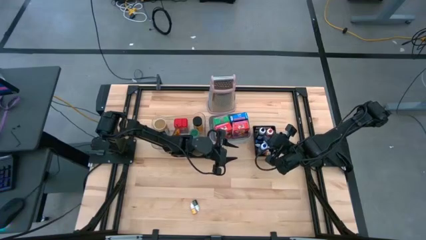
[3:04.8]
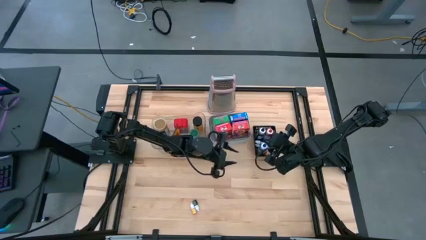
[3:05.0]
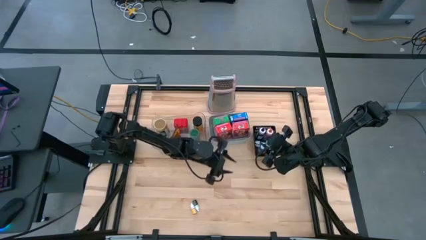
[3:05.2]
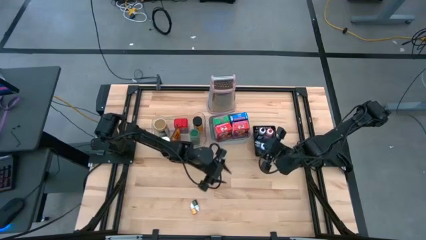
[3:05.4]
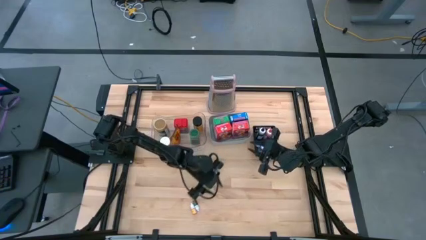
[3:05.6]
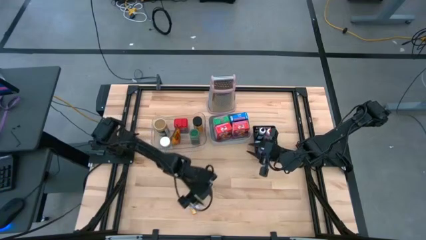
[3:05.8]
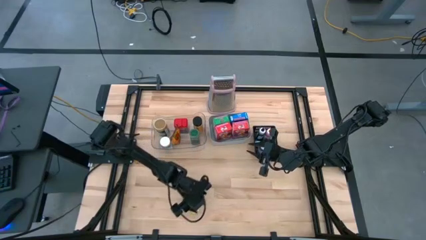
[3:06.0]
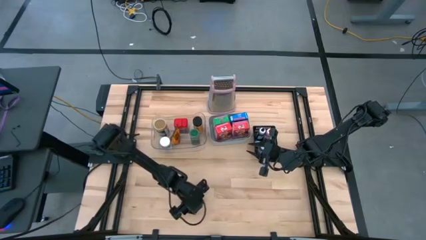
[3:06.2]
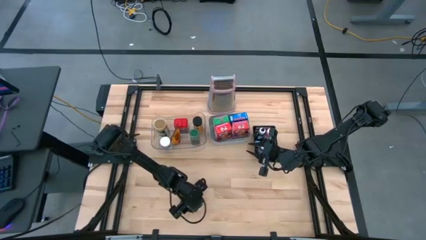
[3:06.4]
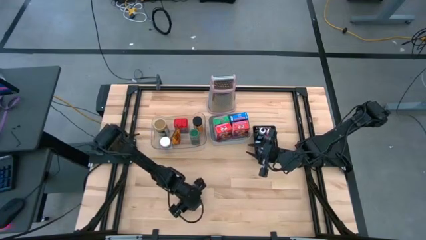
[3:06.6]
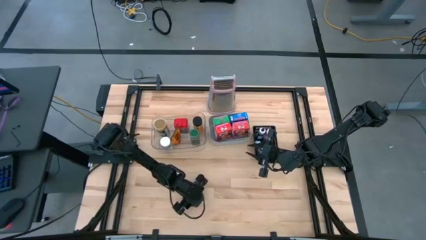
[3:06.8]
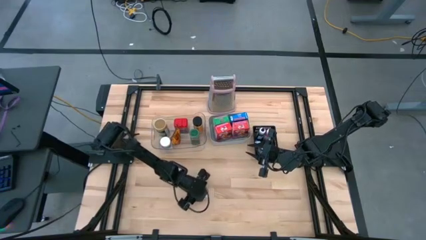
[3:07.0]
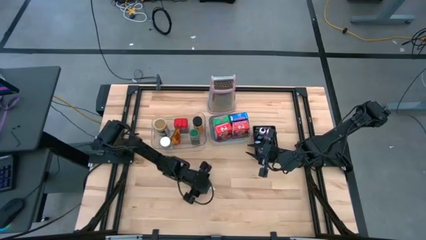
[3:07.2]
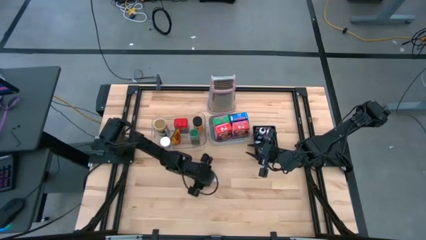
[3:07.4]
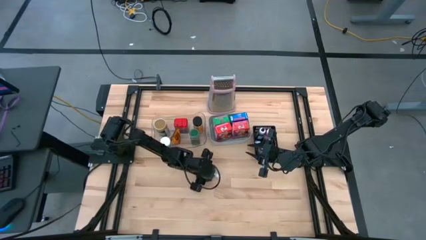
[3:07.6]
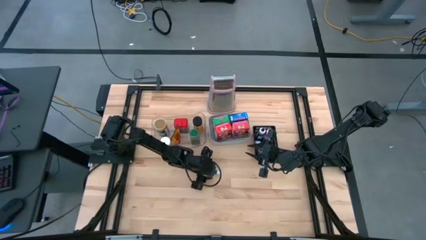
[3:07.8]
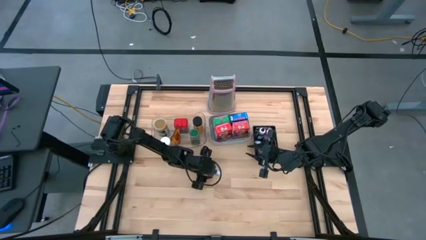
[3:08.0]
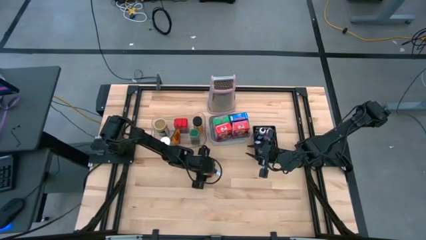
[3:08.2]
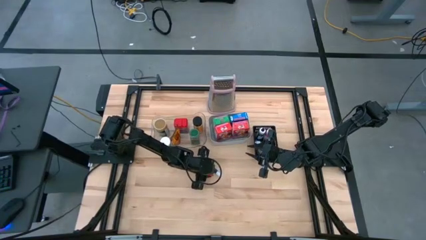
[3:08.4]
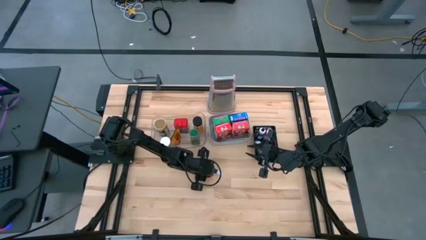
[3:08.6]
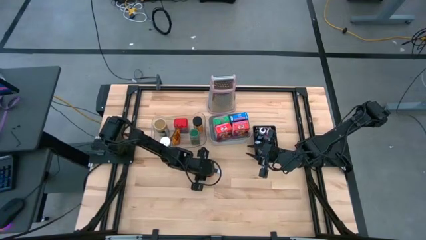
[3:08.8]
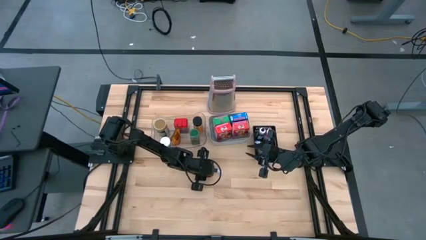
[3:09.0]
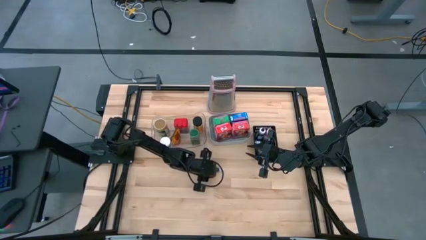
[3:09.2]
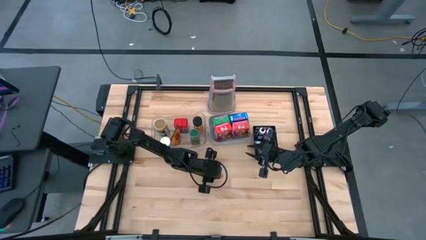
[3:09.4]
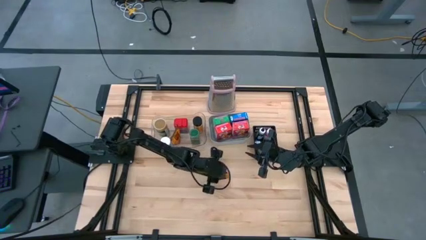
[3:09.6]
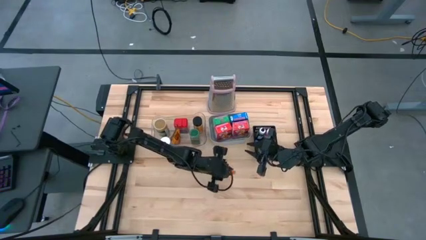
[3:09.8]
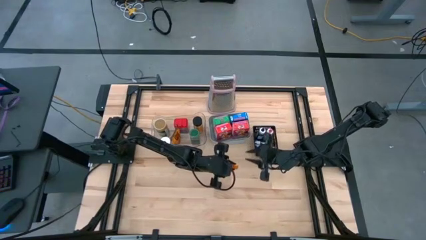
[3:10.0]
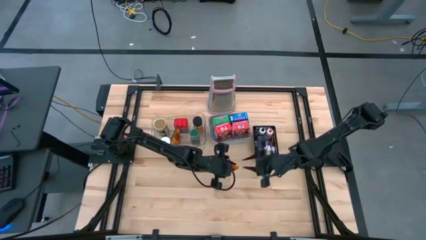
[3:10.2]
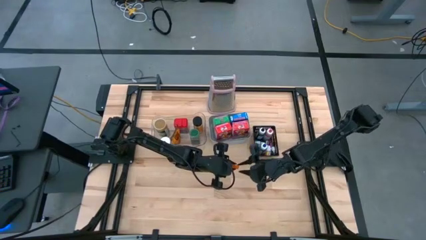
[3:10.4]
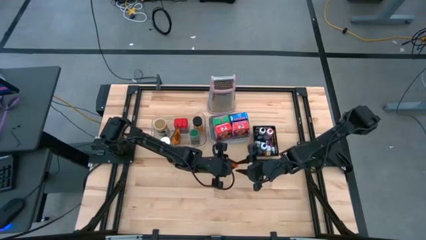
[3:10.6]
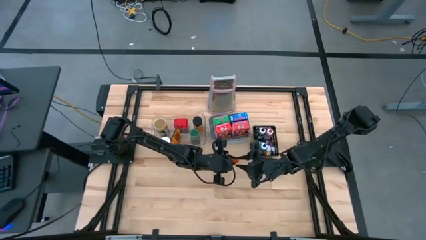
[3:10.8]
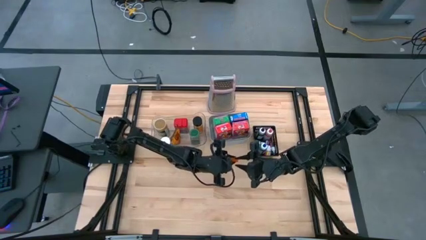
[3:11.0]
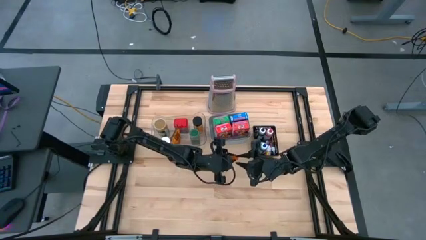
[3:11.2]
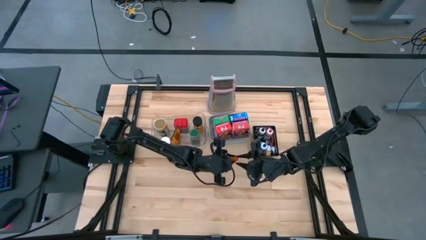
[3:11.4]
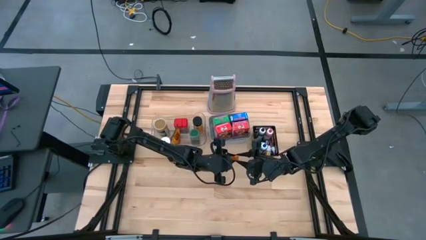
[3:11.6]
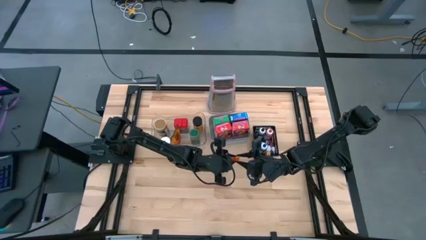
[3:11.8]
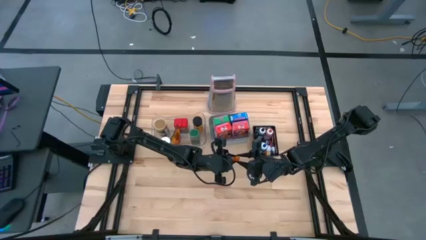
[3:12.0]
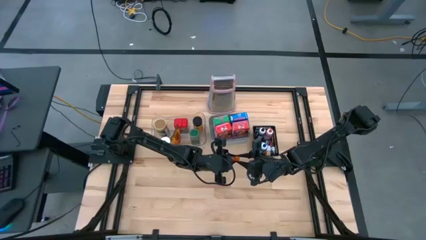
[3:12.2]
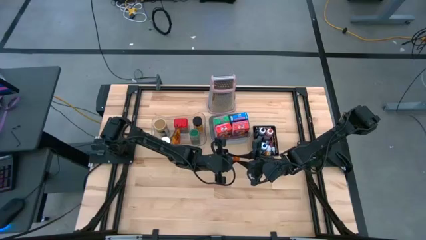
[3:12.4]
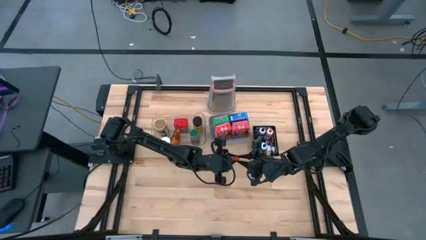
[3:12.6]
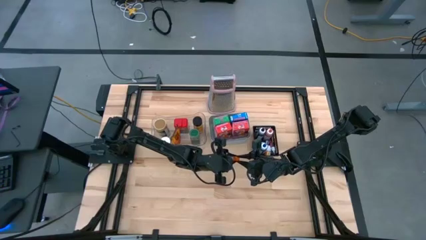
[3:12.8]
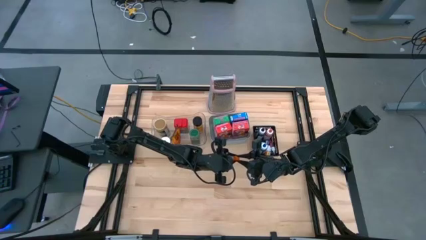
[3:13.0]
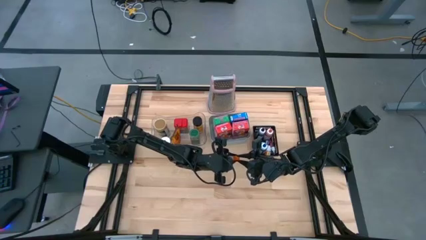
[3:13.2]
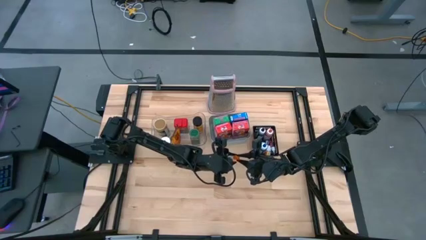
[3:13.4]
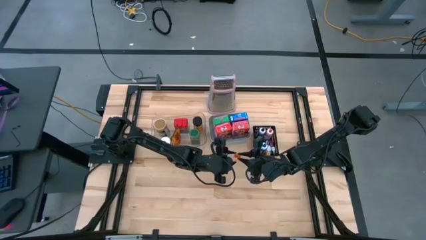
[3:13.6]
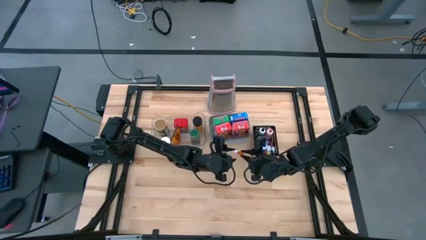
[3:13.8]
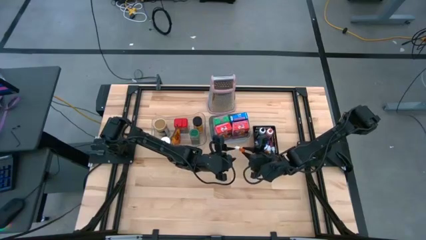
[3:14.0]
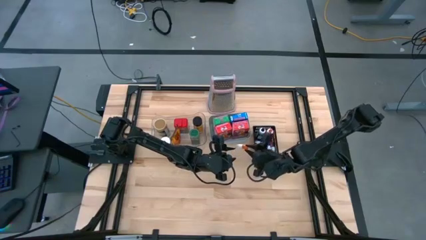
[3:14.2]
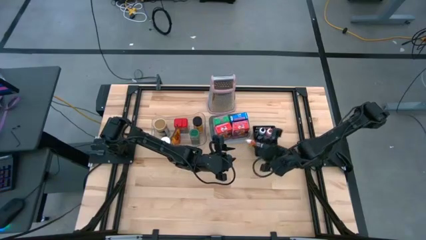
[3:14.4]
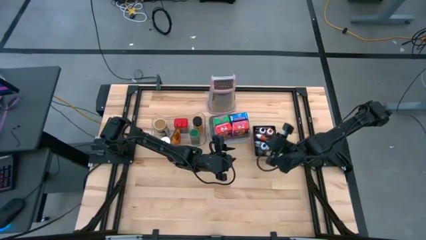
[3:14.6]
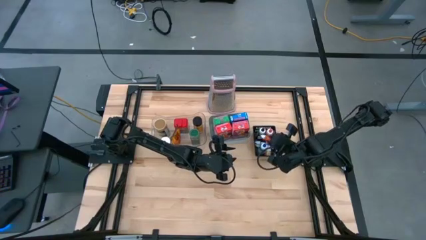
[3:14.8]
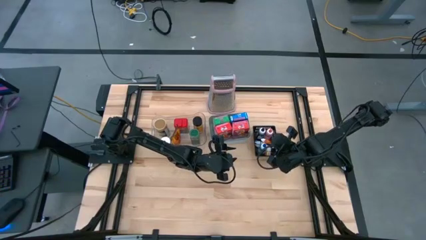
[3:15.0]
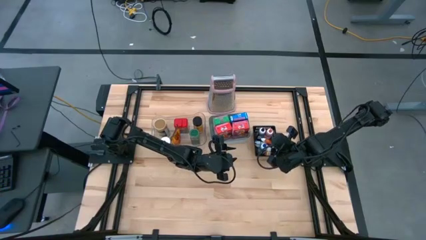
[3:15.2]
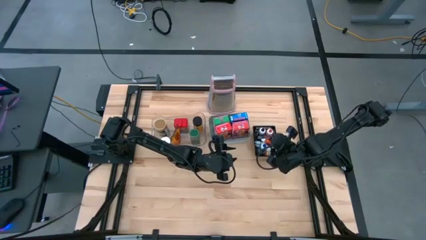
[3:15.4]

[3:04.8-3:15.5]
Task: Pick & Place Kitchen Items
Put the small orange food coloring bottle into the black basket

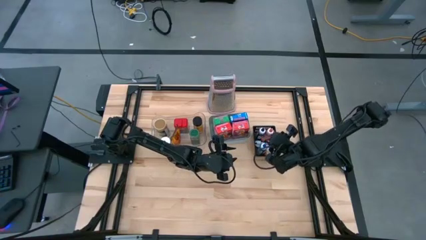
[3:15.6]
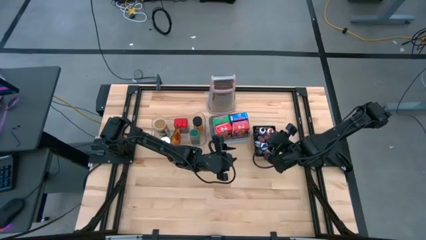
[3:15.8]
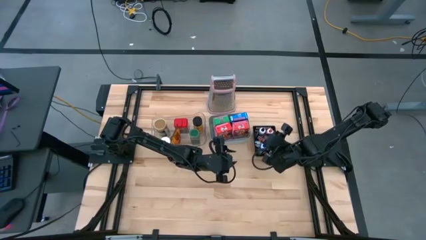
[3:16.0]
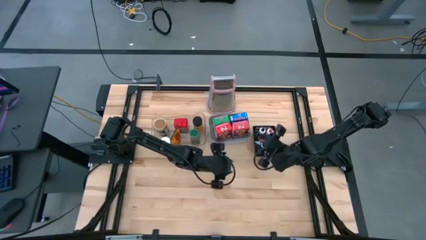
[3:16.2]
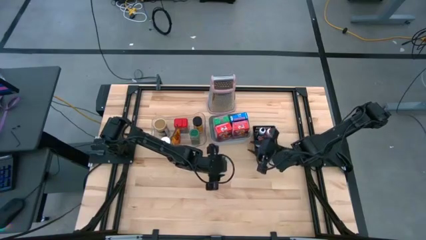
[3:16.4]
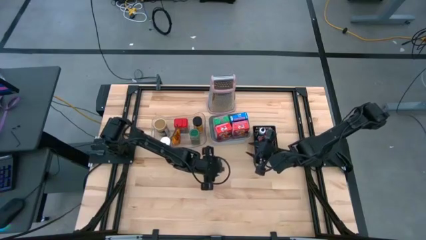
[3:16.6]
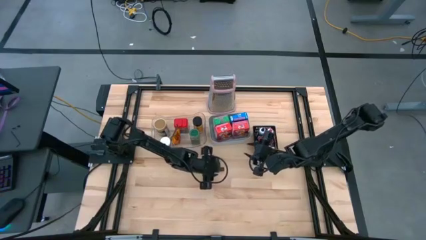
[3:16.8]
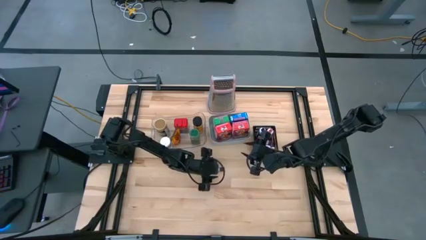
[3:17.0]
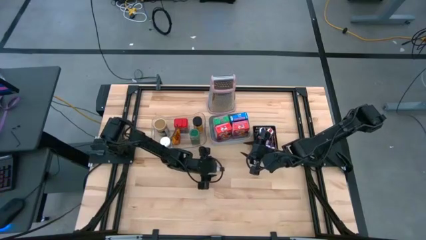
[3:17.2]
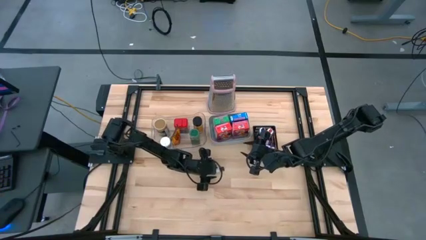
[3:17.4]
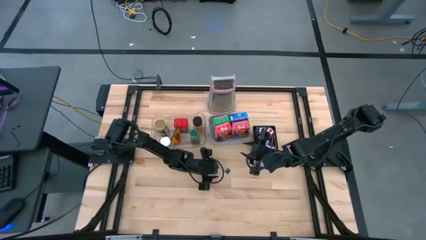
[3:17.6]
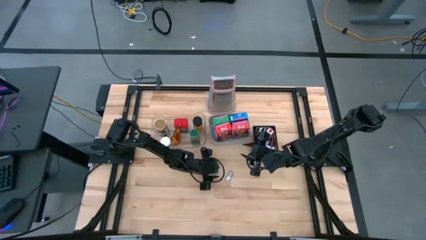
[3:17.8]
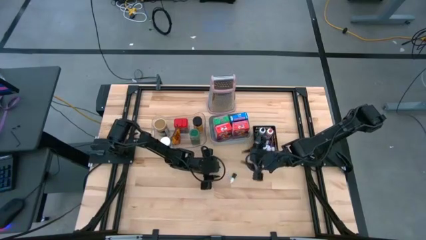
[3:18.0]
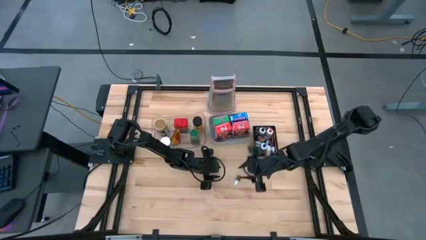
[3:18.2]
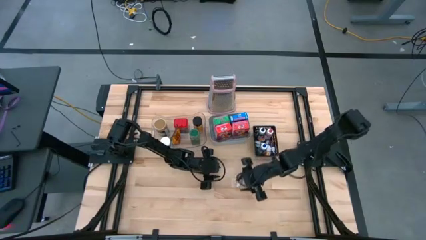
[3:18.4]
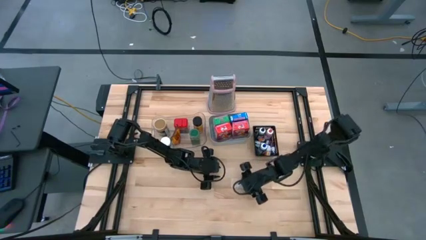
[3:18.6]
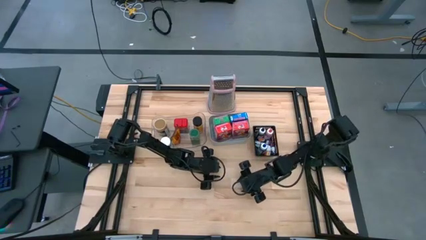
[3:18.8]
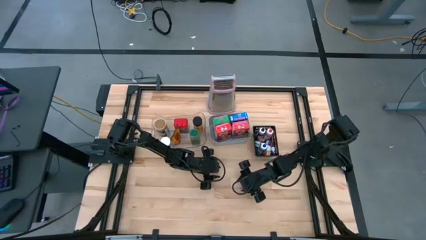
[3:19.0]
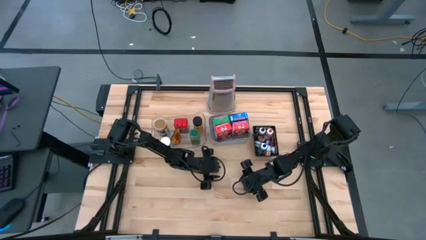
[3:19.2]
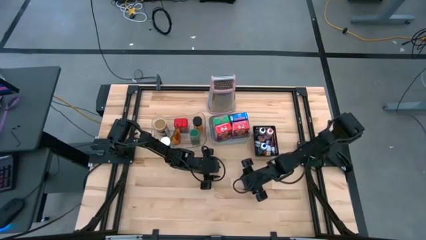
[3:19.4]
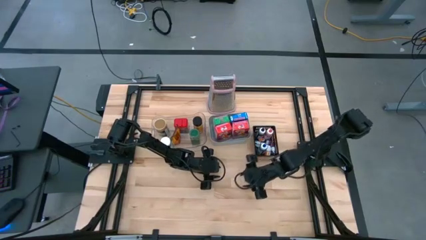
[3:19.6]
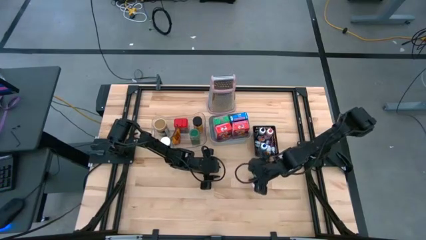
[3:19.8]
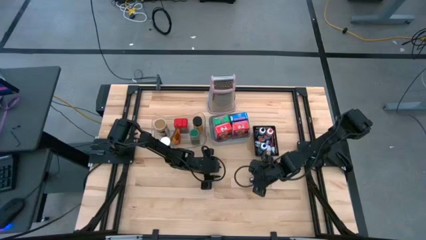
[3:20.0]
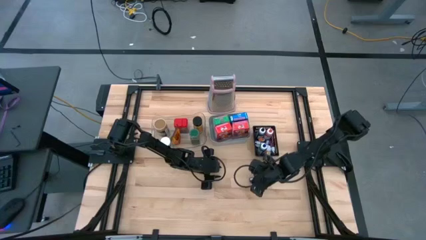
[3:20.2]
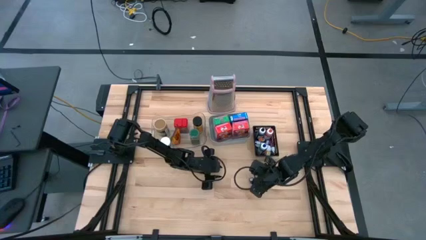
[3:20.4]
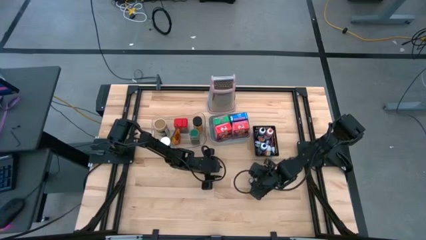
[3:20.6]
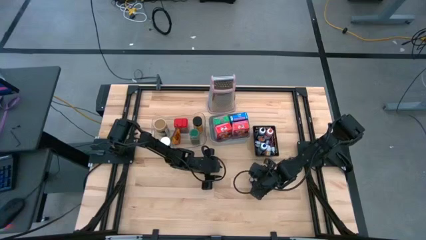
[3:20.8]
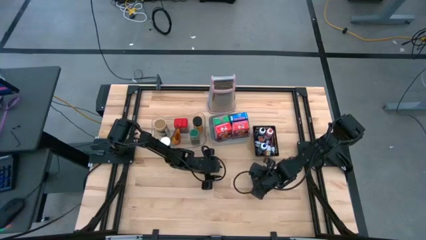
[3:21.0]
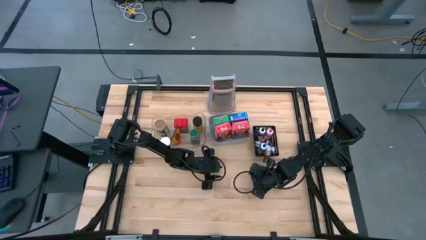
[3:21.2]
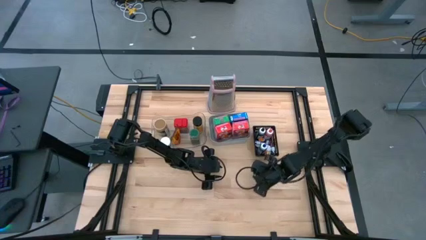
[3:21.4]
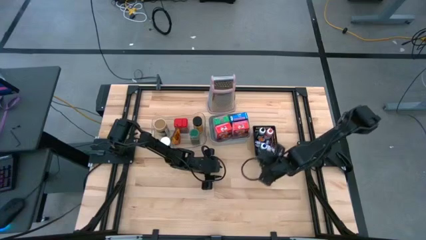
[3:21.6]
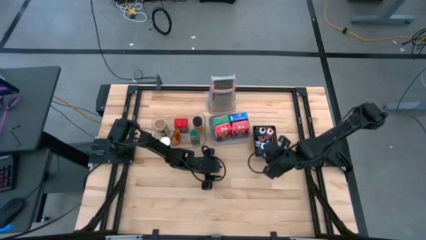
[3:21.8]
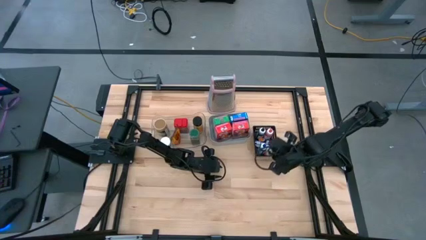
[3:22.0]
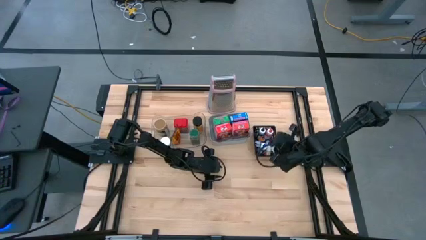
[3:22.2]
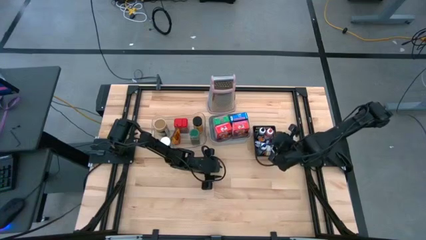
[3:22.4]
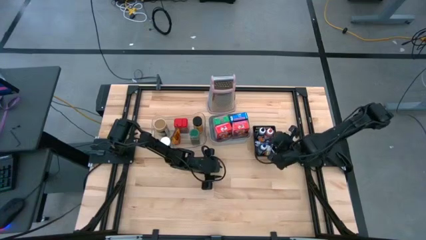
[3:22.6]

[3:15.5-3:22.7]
Put the small green food coloring bottle into the black basket
